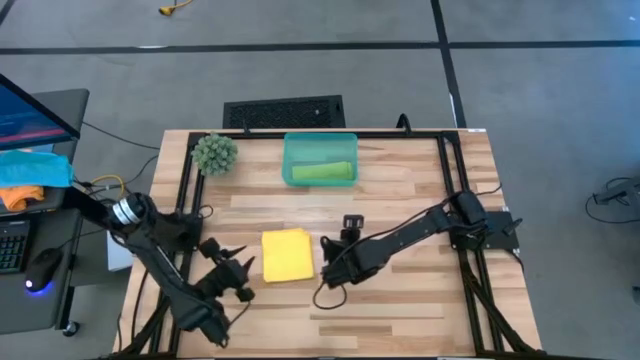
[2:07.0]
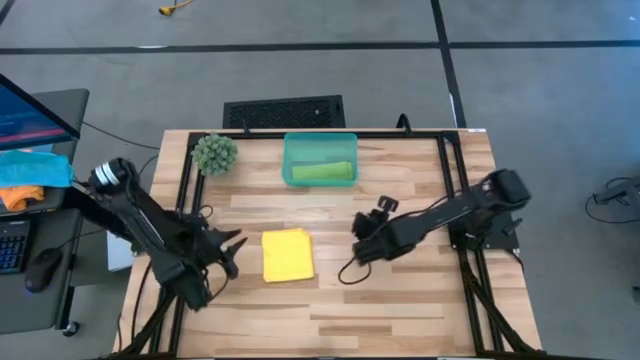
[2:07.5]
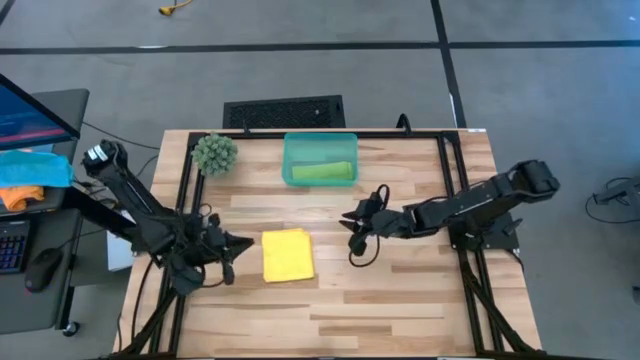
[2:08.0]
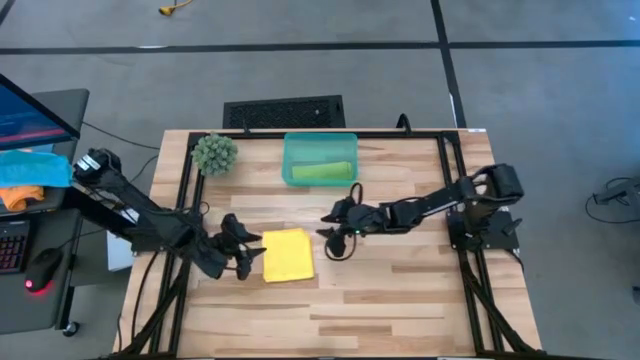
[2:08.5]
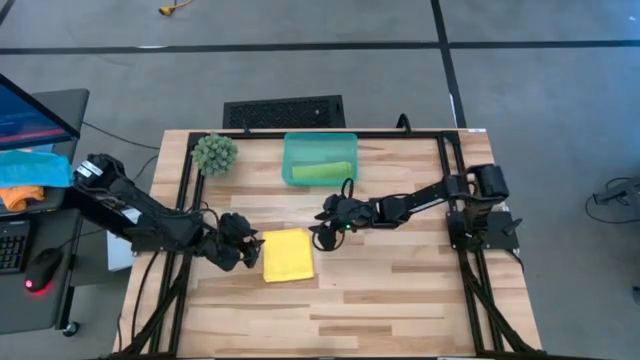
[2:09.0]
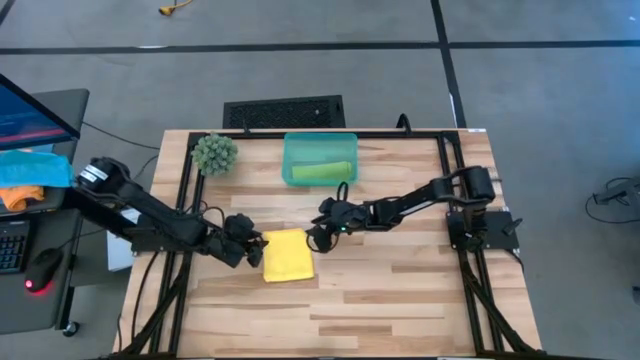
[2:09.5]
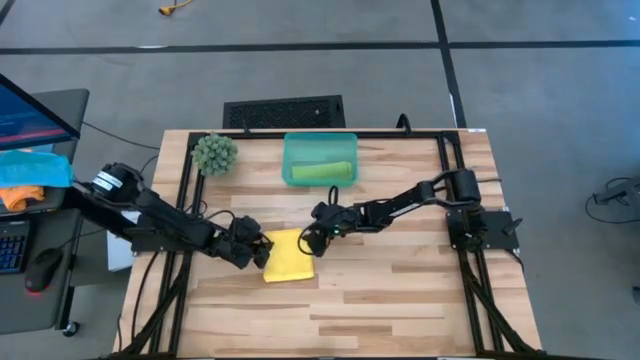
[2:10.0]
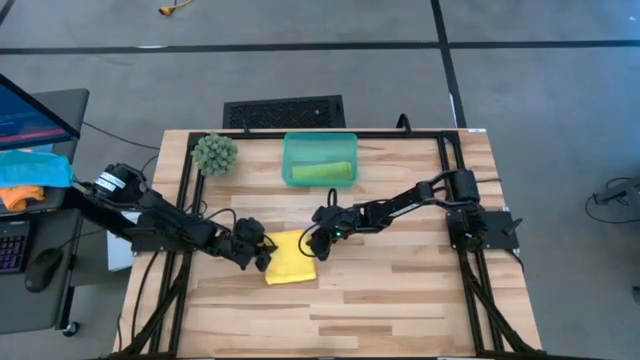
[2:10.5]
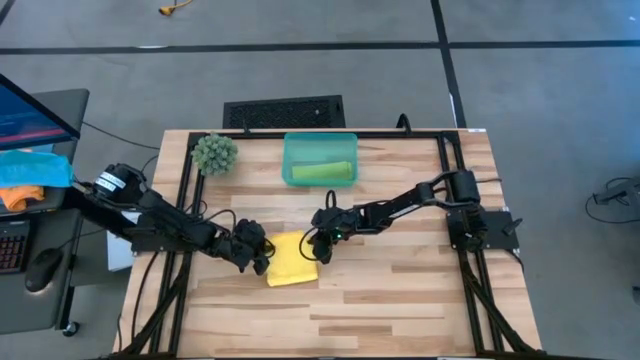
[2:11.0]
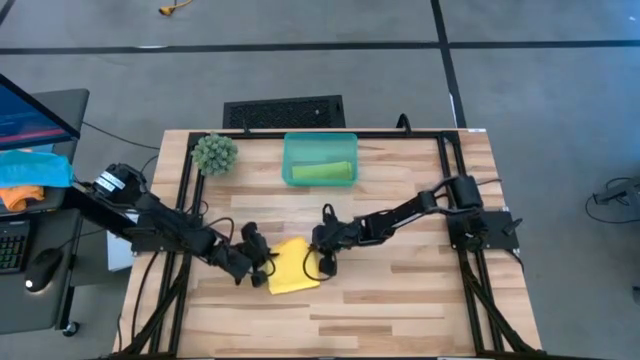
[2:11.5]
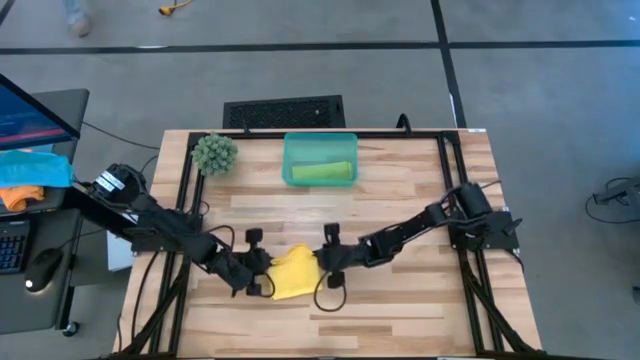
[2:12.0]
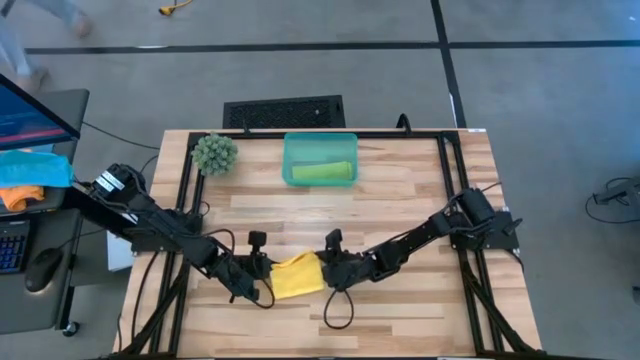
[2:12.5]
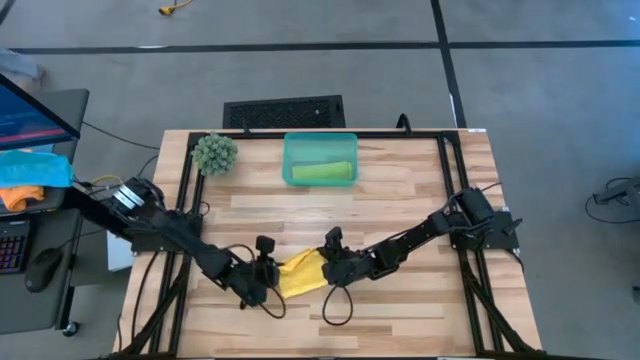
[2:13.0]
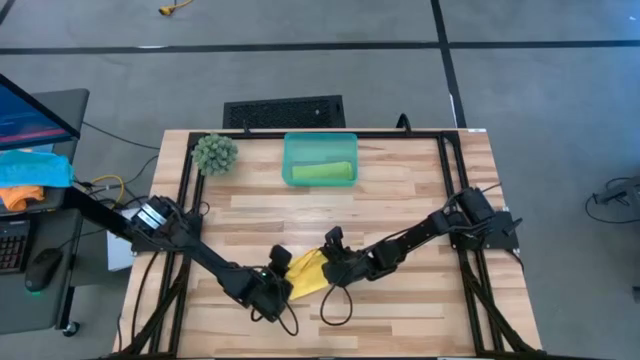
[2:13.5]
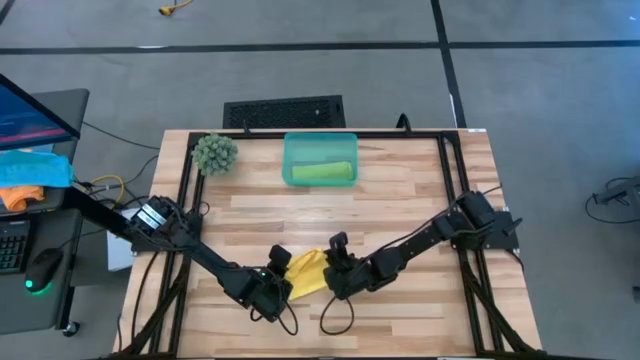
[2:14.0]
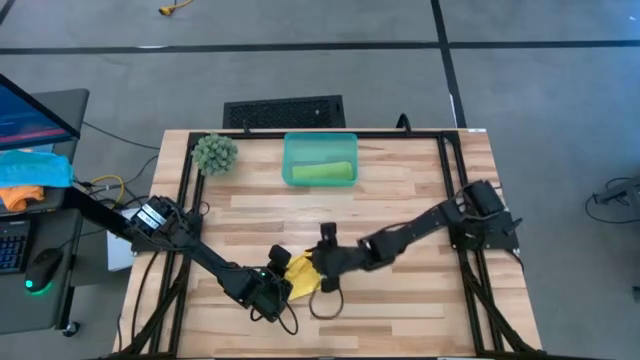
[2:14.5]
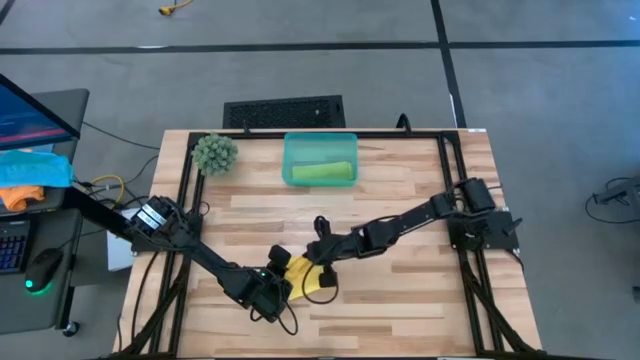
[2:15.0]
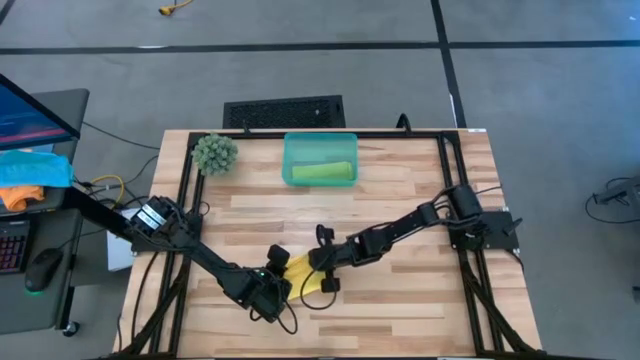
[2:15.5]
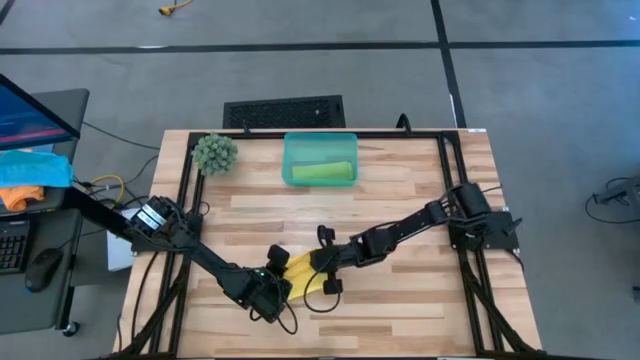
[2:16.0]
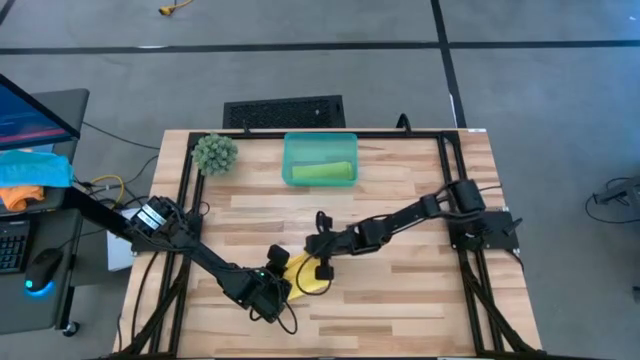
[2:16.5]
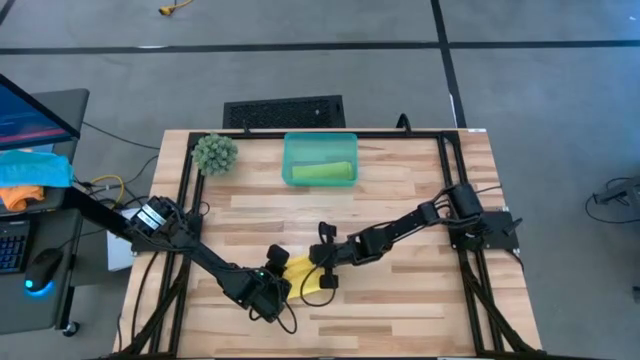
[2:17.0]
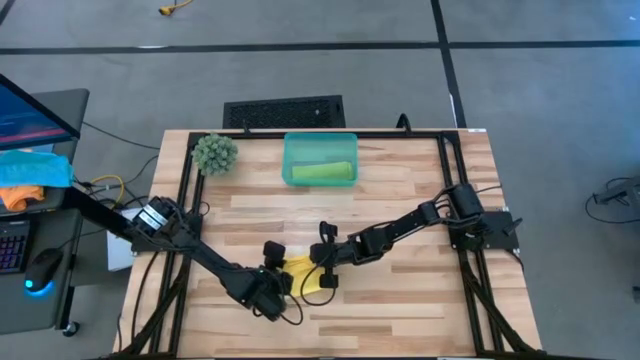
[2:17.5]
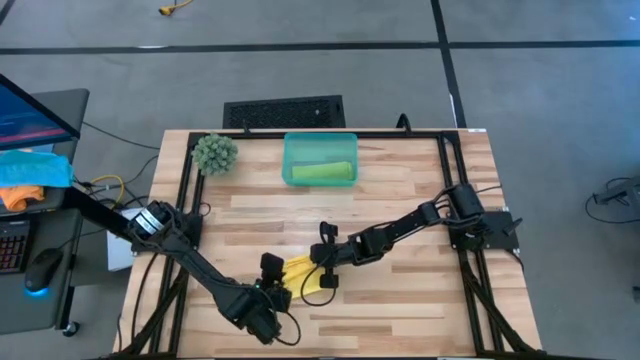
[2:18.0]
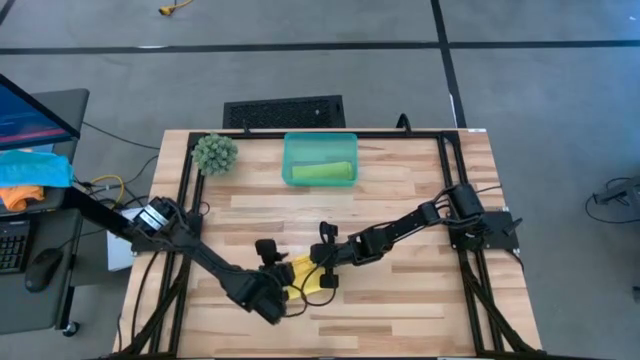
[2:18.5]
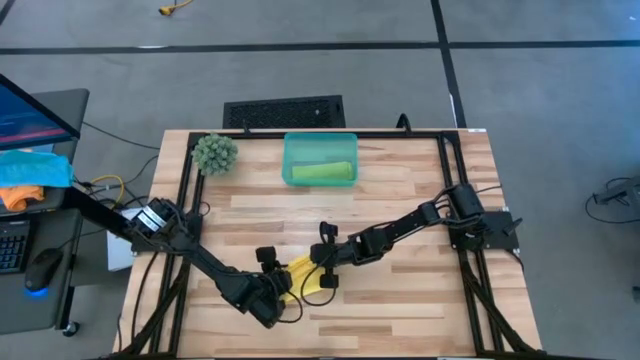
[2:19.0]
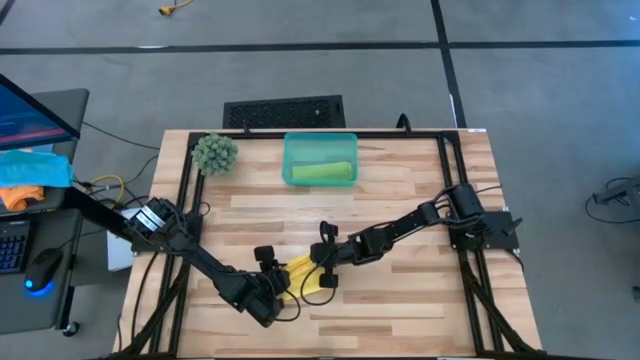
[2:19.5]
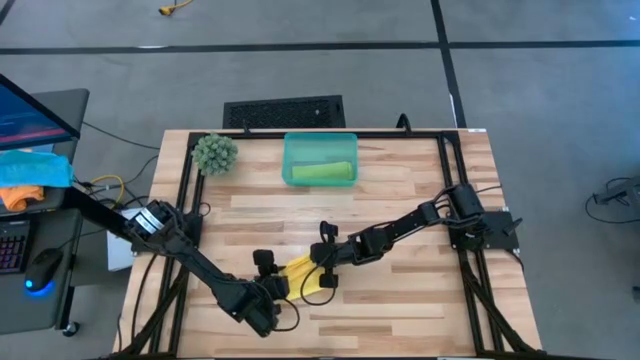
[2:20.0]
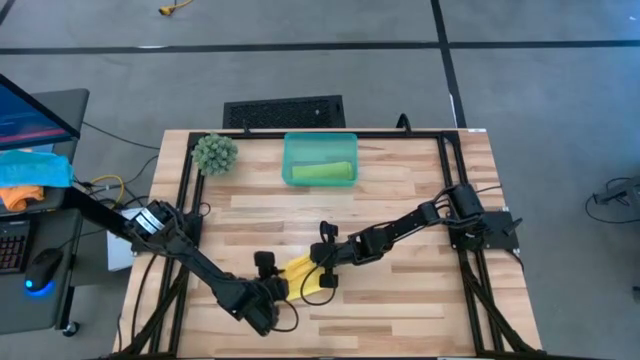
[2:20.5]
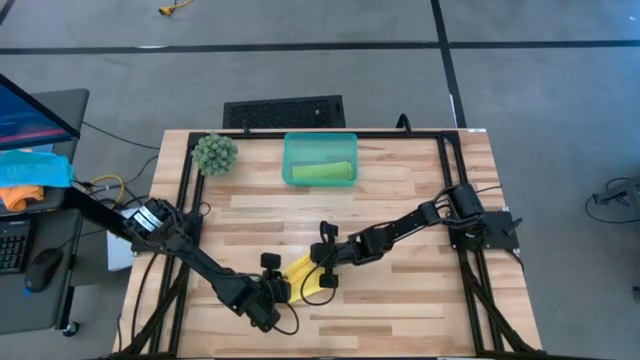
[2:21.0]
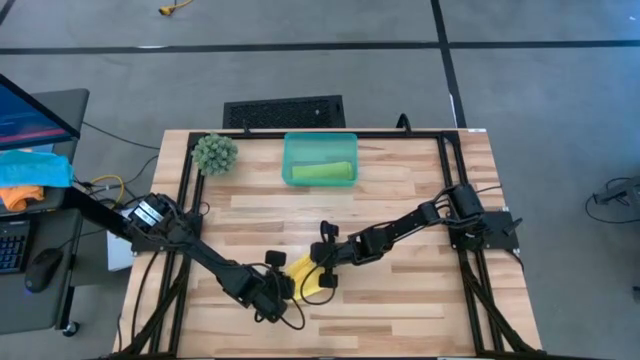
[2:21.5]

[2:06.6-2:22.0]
Task: Roll microfiber towels into tight, uniform cylinder then place into a basket
Roll the yellow microfiber cloth
